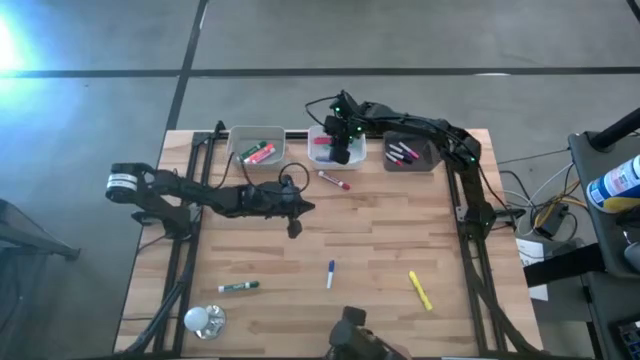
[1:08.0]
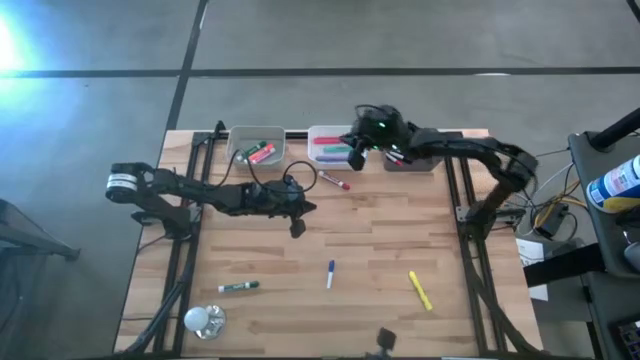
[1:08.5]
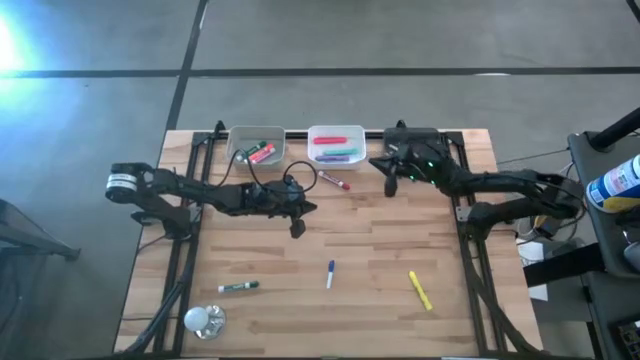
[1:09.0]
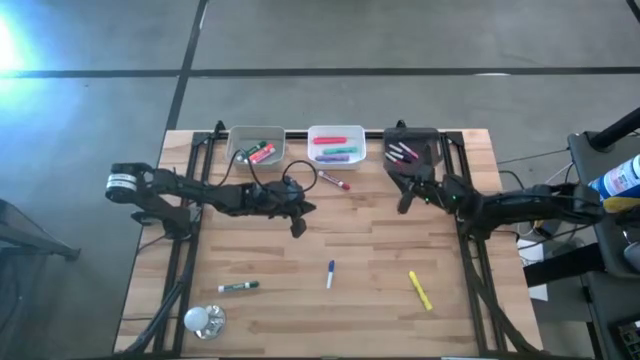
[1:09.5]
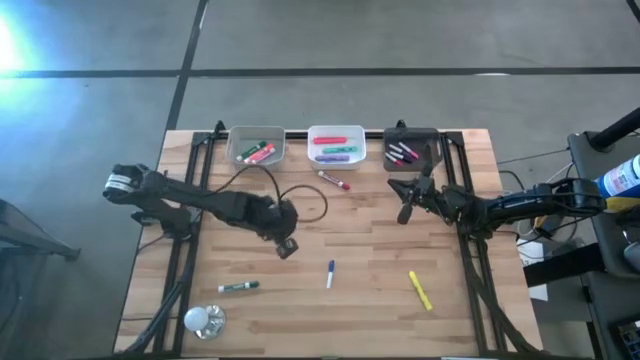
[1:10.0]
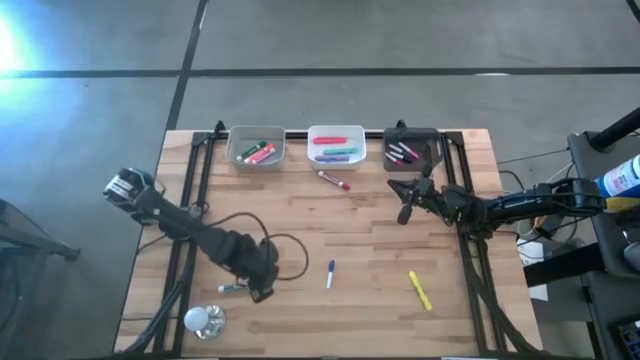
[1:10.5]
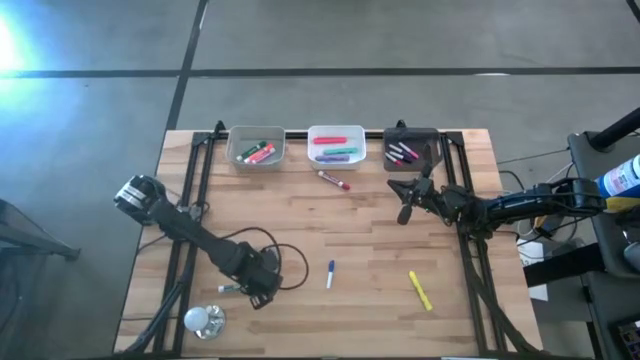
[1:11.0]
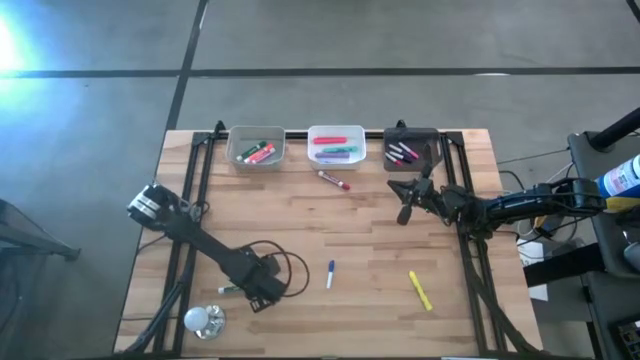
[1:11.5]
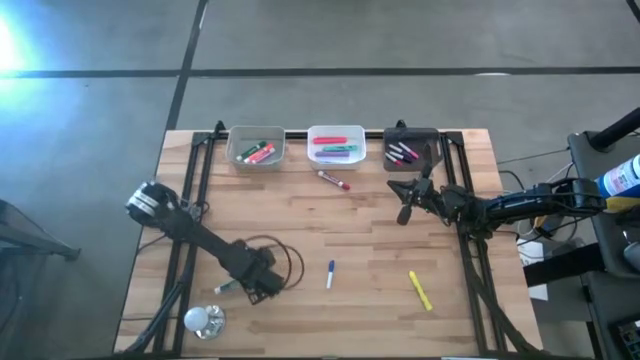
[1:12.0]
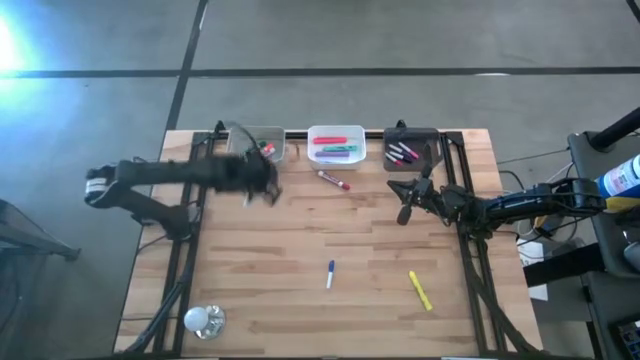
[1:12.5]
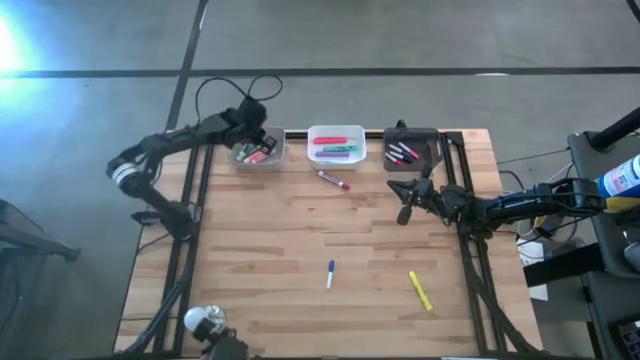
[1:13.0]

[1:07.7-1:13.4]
Task: Pick & Place Markers
Put the dark green marker pen into the gray bin

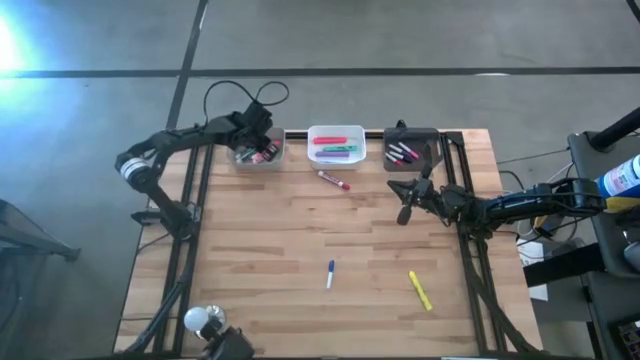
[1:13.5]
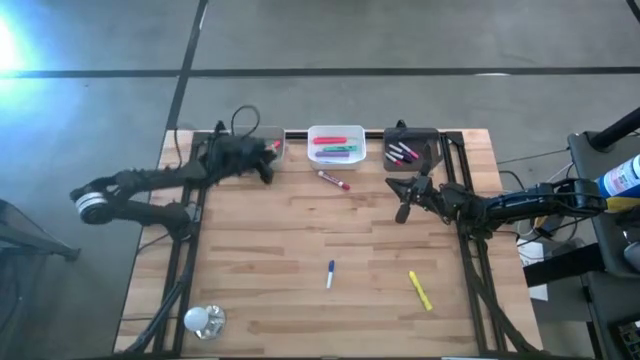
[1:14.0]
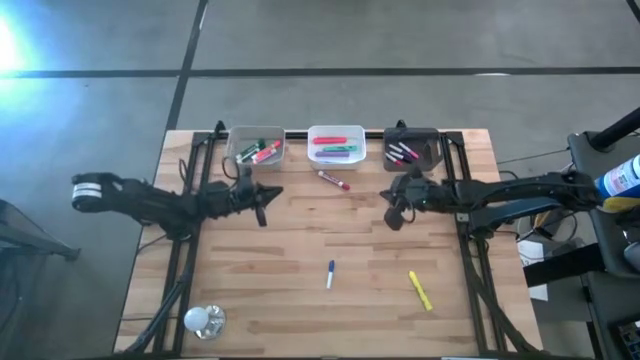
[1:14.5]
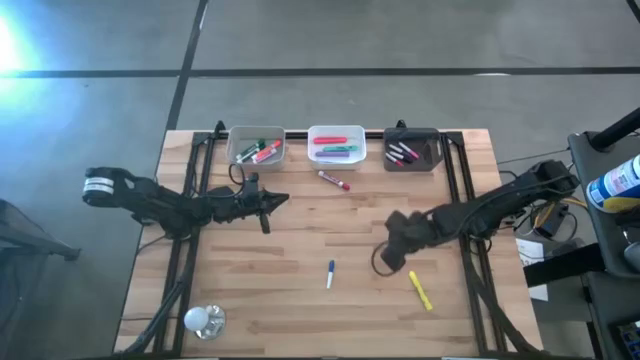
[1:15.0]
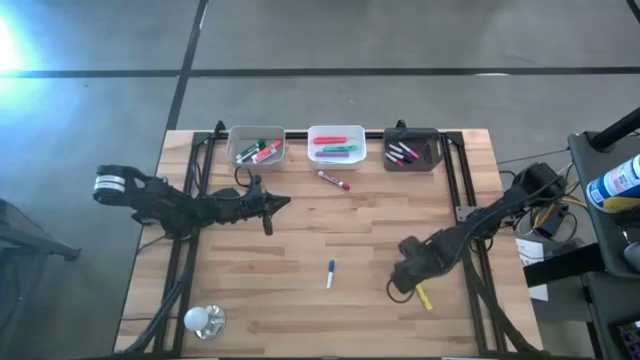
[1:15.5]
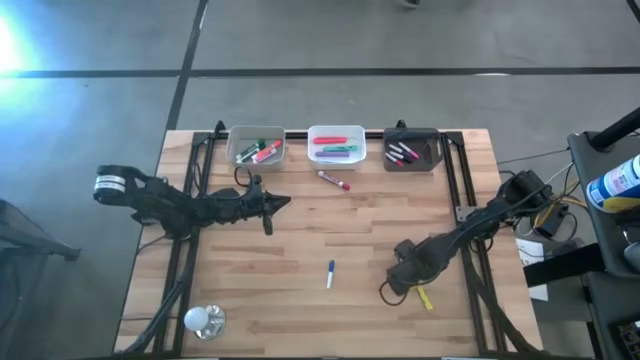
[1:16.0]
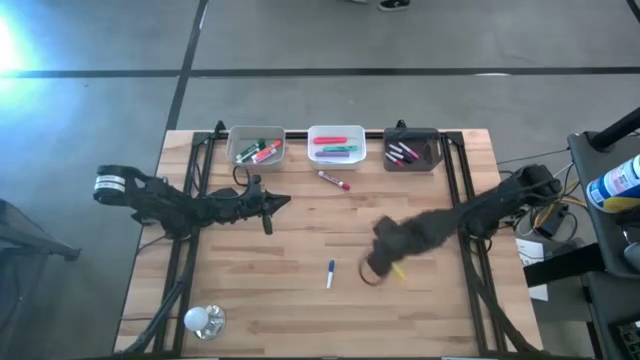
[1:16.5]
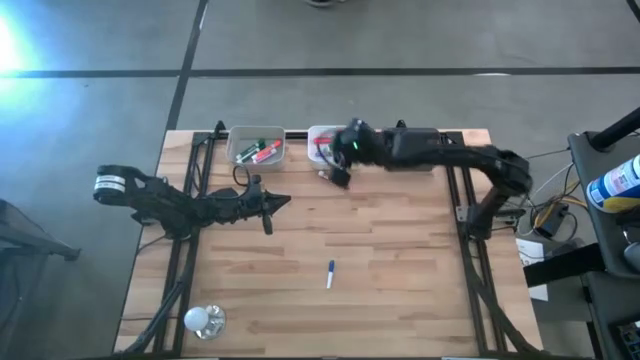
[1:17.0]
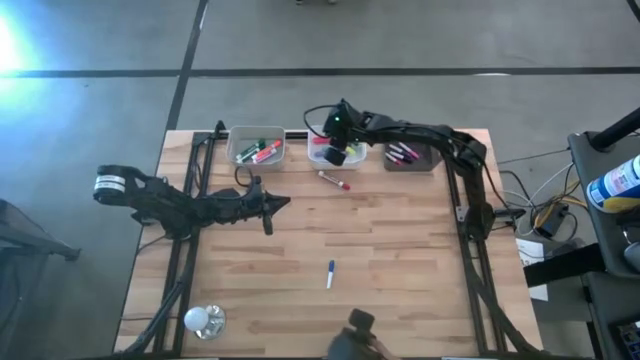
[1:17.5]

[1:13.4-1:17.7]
Put the yellow highlighter pen into the white bin

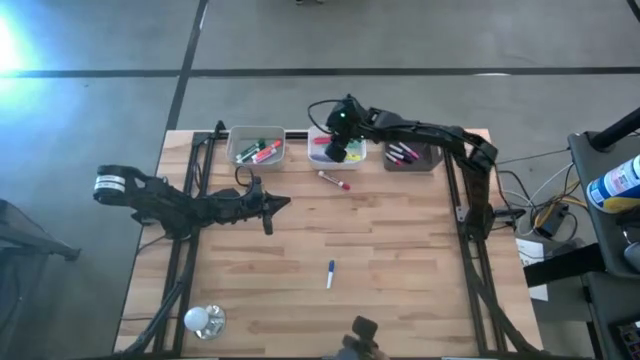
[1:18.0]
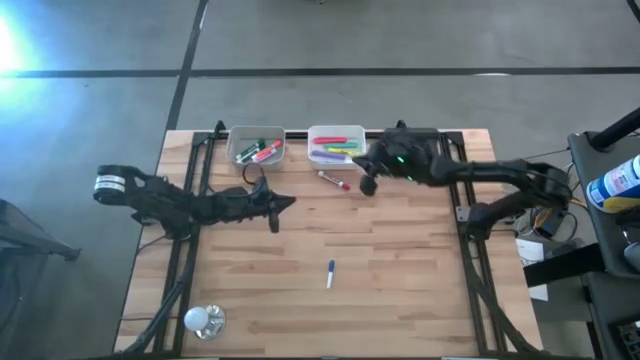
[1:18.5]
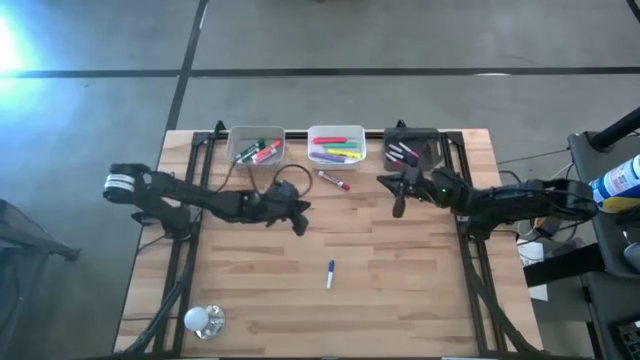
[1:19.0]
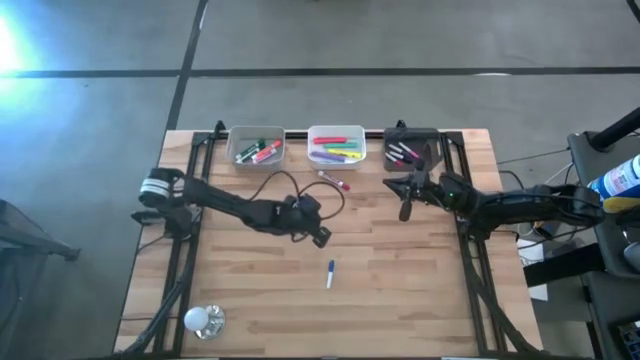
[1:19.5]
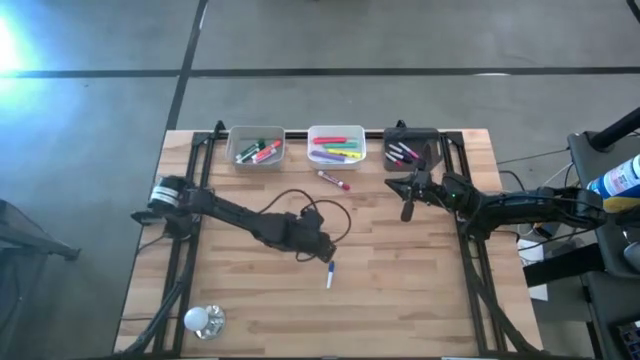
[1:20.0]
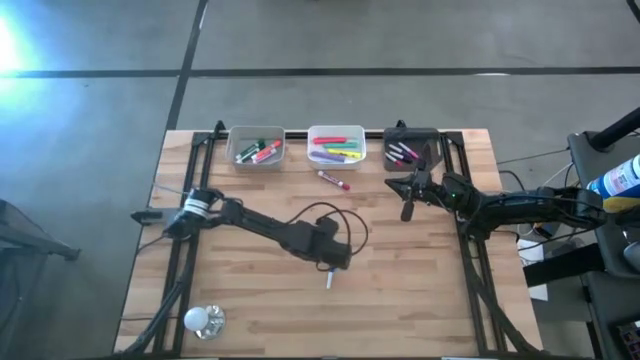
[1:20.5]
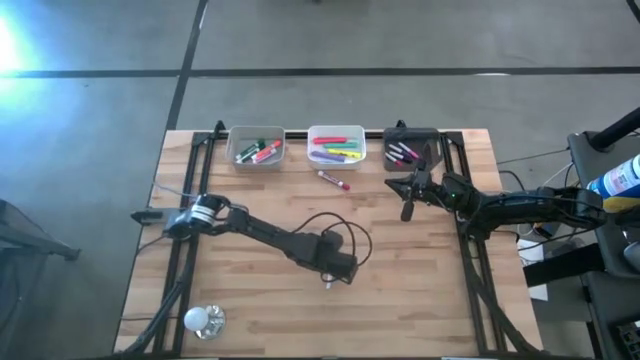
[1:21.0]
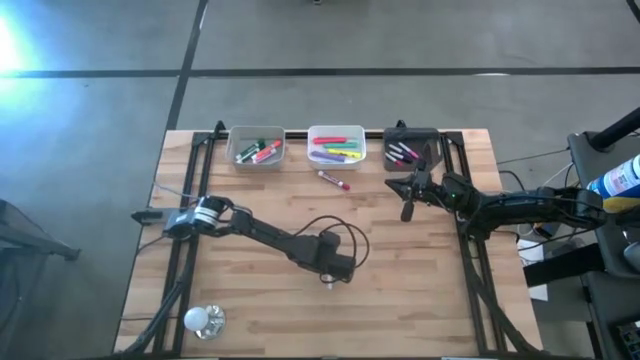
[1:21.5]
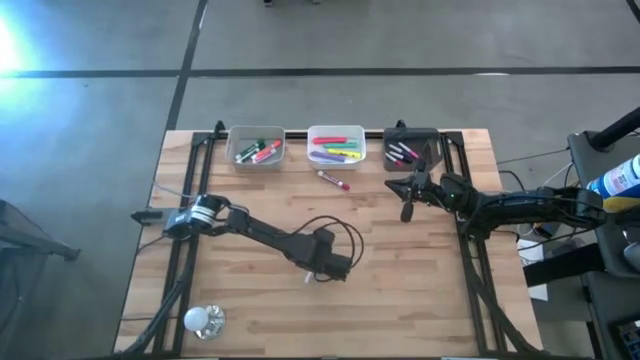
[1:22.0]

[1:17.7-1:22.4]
Put the blue pen into the black bin

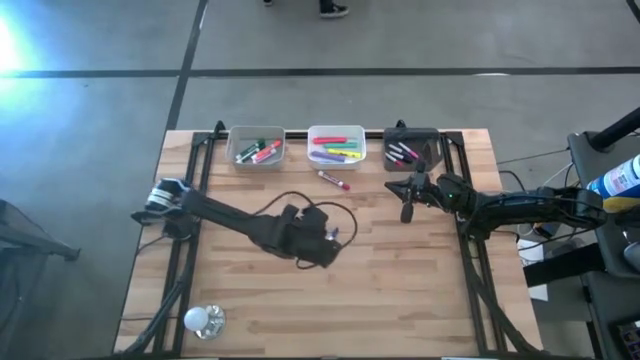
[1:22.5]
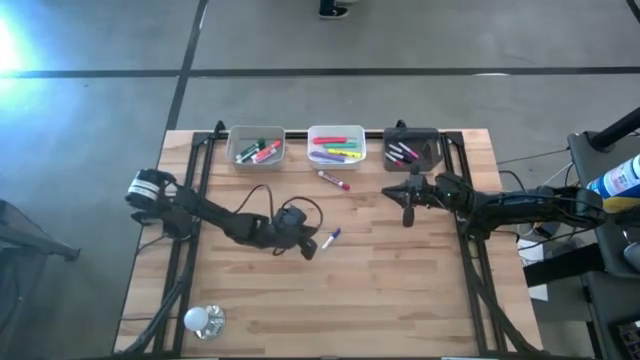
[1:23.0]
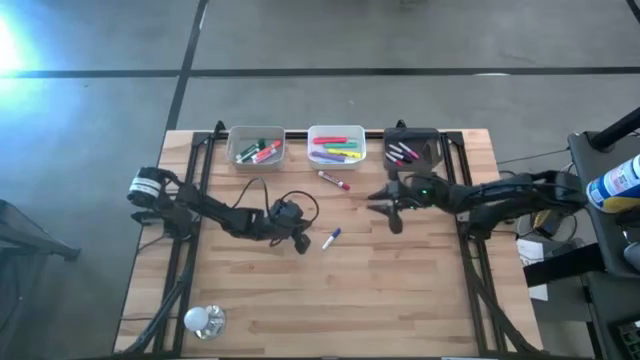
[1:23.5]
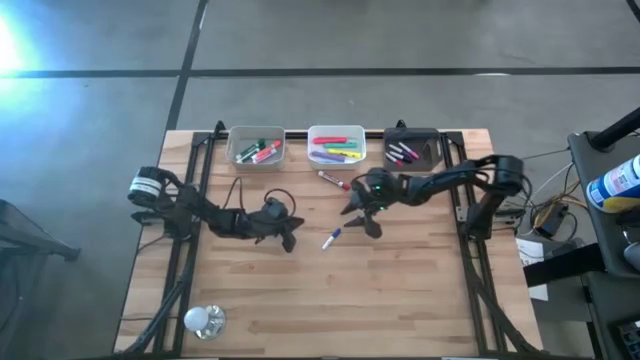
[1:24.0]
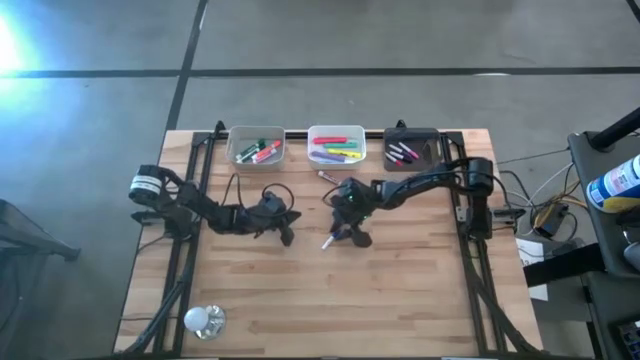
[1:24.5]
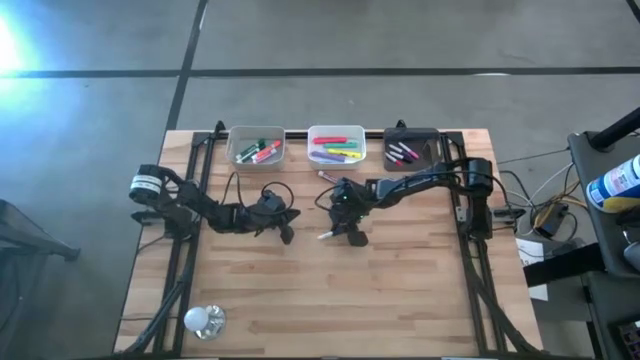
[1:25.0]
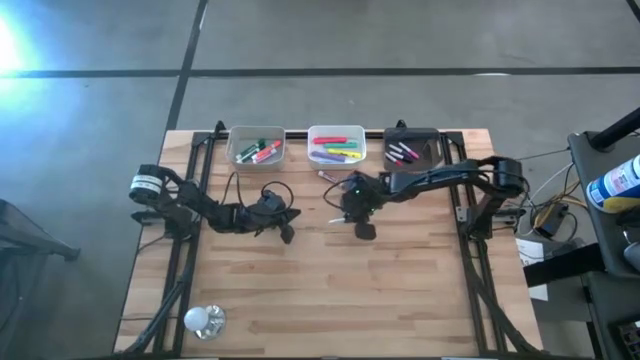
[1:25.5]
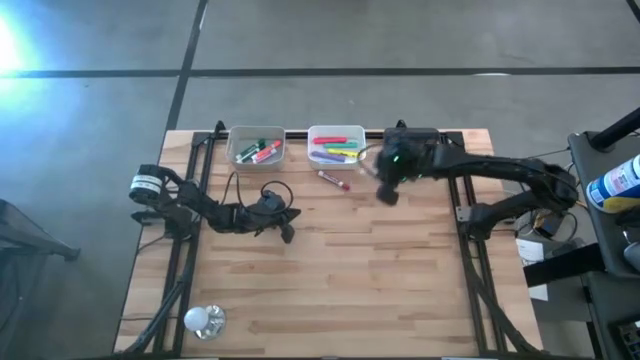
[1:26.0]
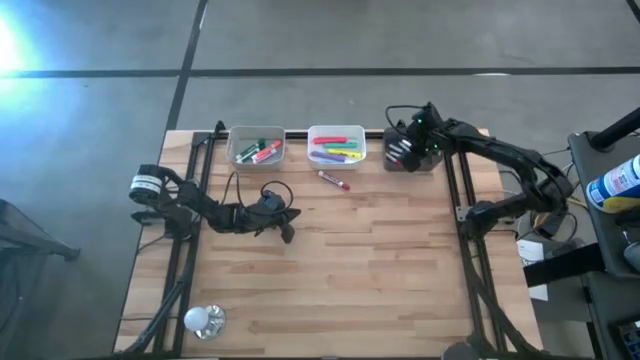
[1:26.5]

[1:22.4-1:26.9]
Put the blue pen into the black bin

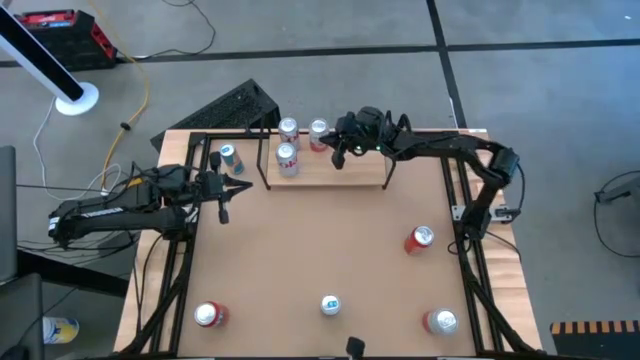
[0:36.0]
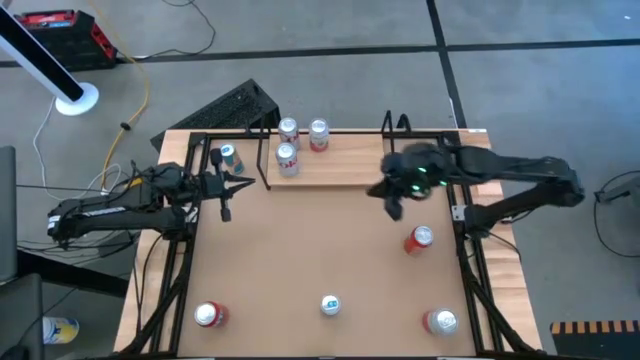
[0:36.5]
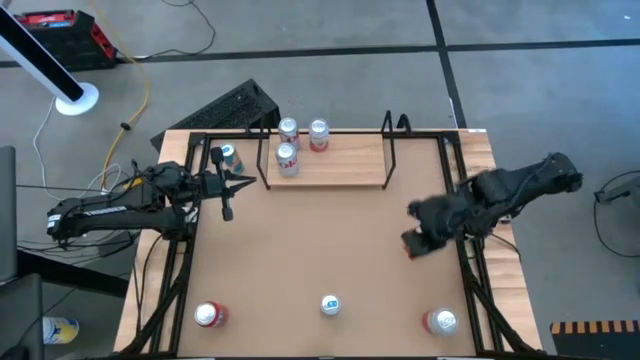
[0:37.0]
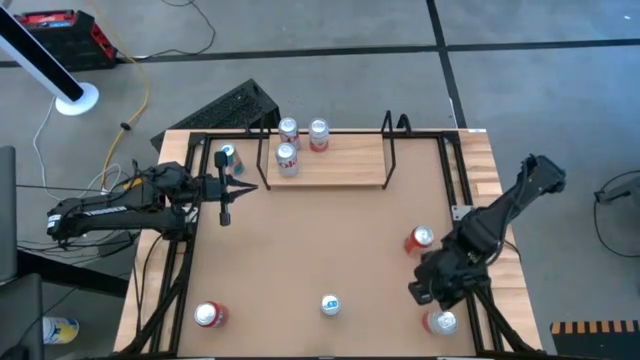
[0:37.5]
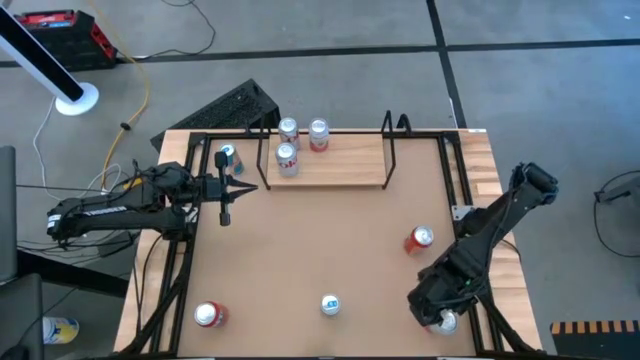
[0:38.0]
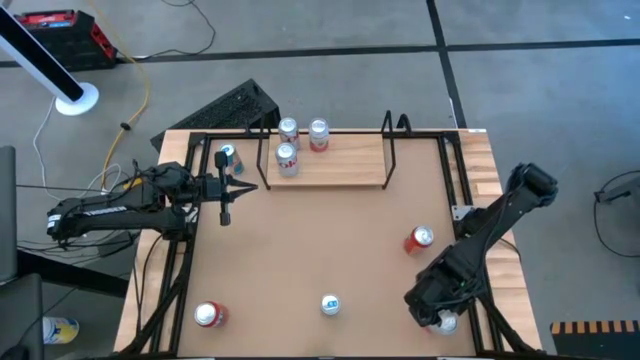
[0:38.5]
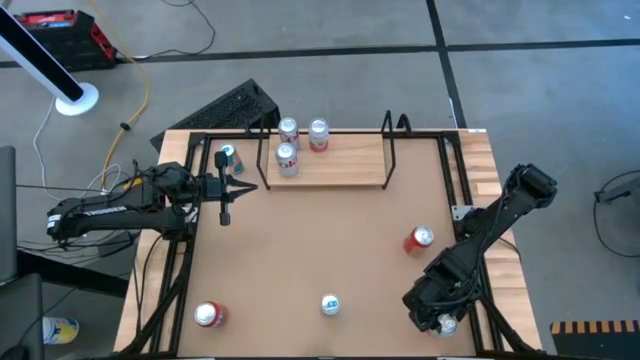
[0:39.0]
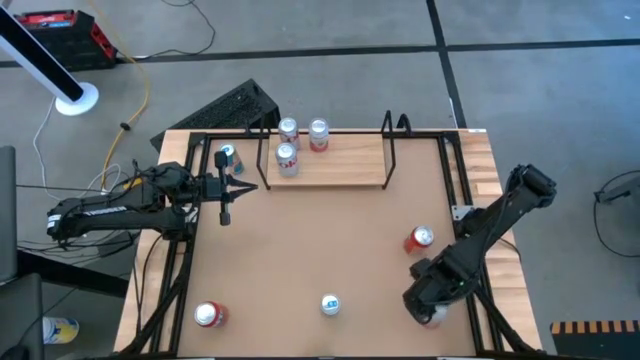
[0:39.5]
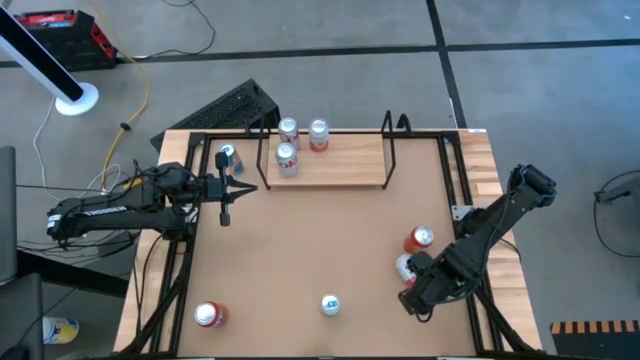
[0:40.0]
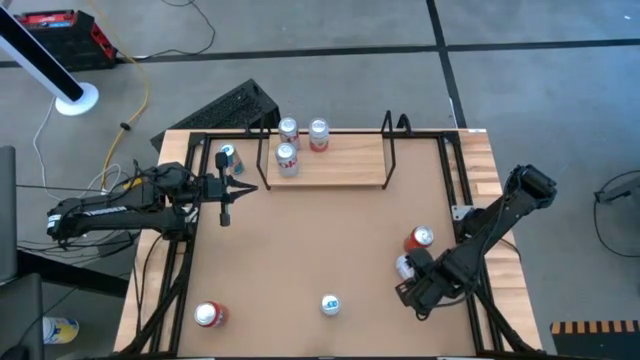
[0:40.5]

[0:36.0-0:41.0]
Task: Place canned beverage on shelf
Put the pink-white soda can on the shelf aligned with the other pink-white soda can
